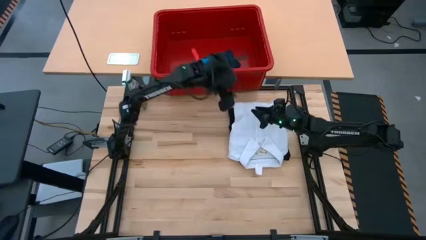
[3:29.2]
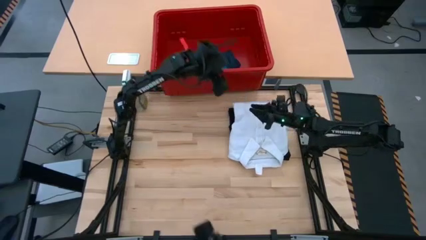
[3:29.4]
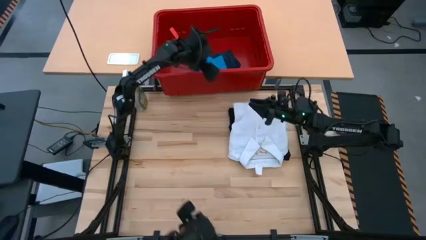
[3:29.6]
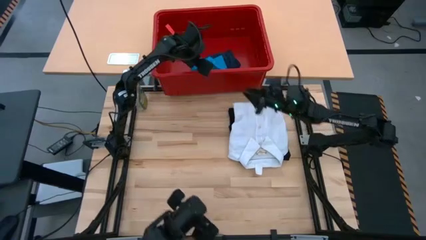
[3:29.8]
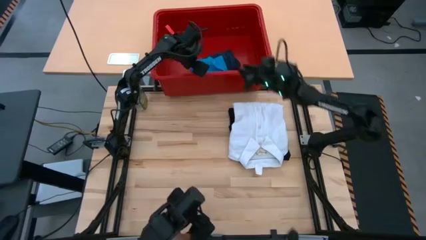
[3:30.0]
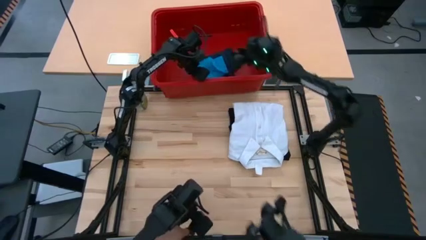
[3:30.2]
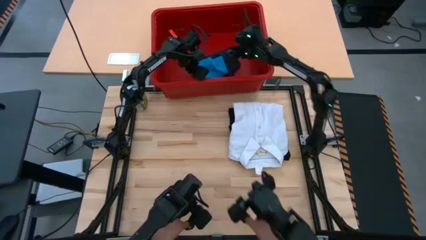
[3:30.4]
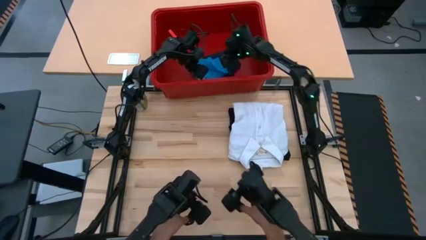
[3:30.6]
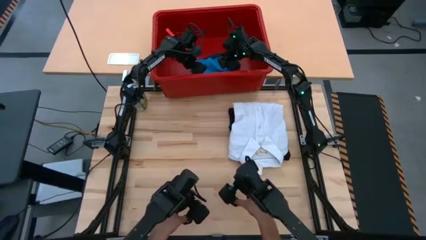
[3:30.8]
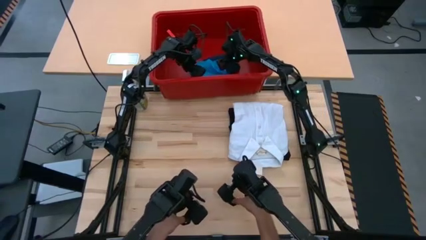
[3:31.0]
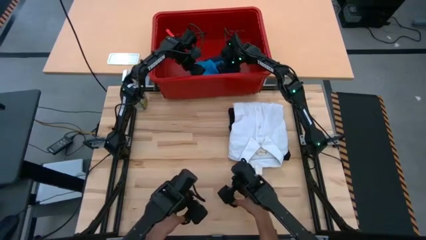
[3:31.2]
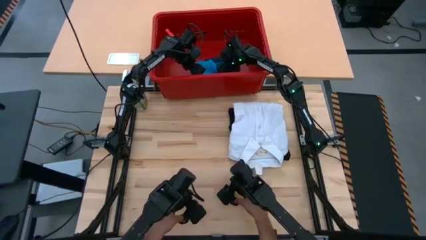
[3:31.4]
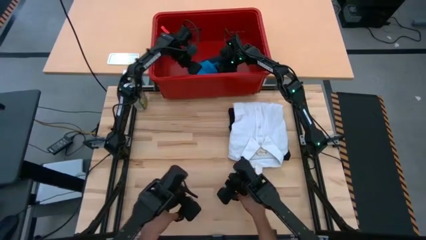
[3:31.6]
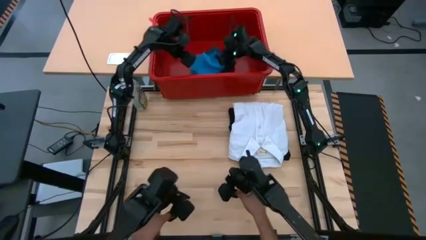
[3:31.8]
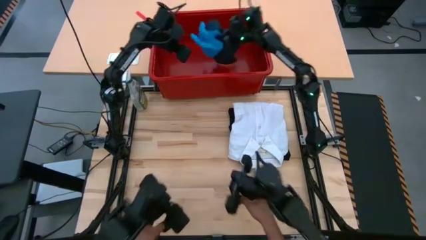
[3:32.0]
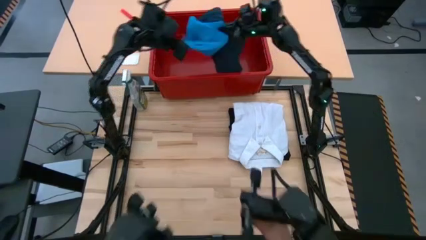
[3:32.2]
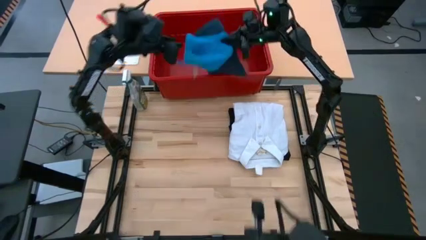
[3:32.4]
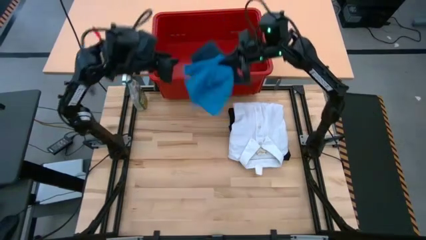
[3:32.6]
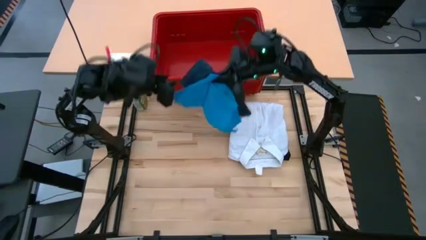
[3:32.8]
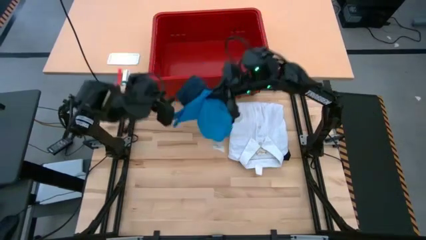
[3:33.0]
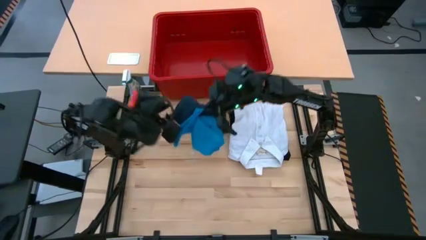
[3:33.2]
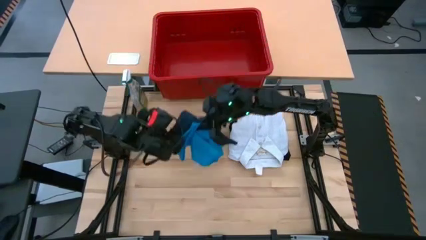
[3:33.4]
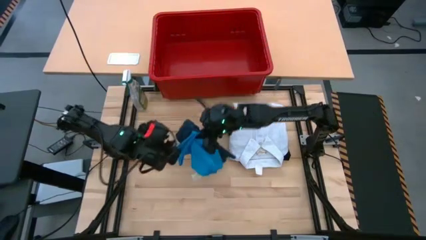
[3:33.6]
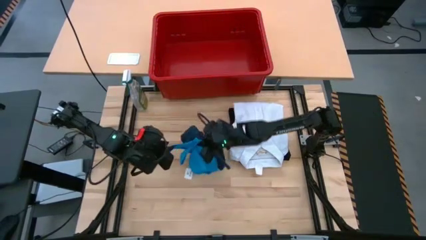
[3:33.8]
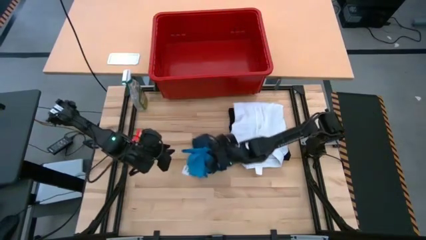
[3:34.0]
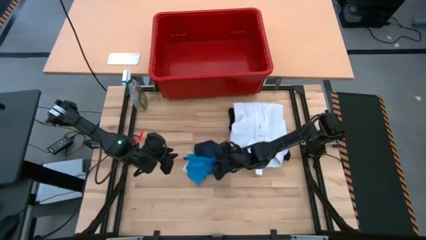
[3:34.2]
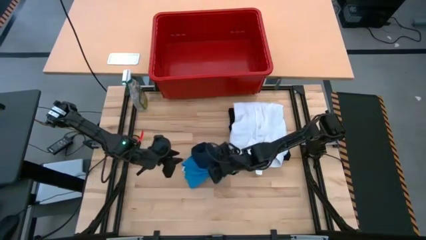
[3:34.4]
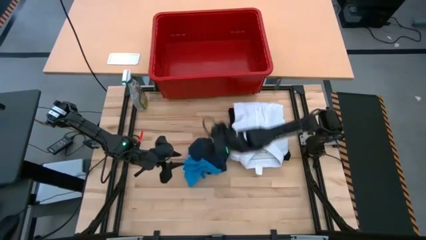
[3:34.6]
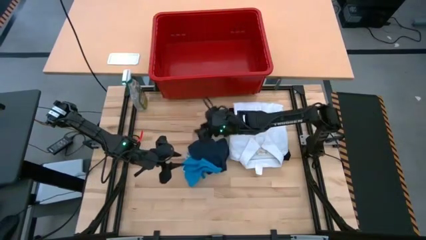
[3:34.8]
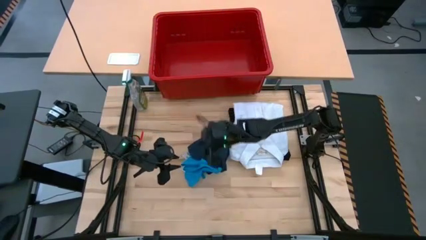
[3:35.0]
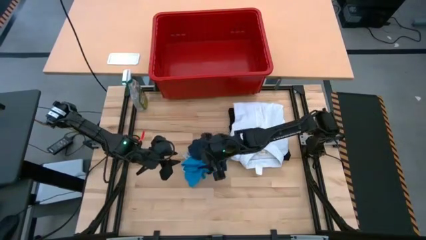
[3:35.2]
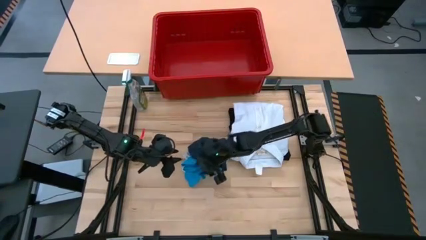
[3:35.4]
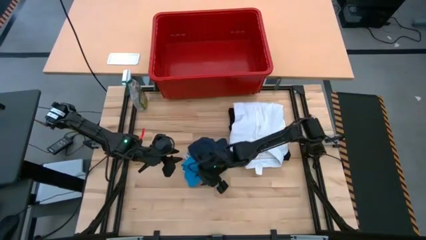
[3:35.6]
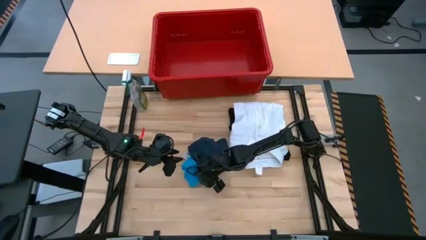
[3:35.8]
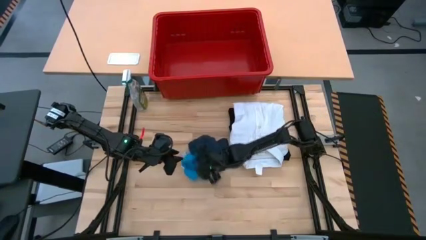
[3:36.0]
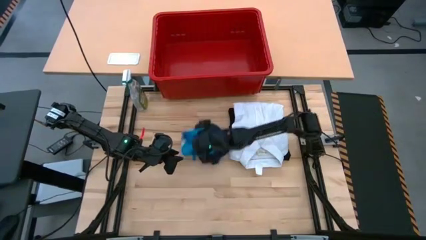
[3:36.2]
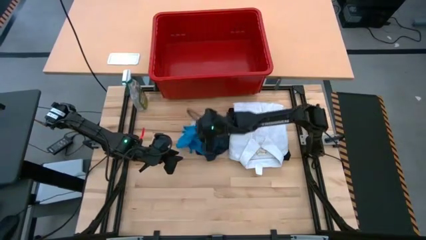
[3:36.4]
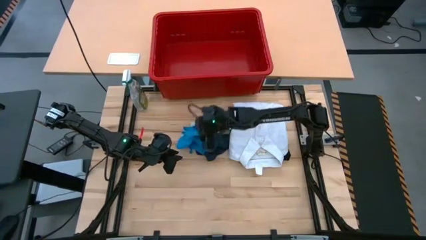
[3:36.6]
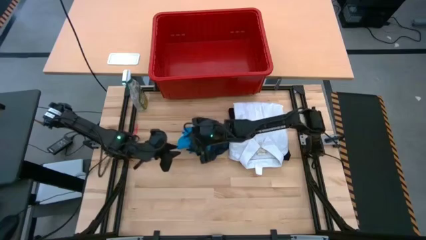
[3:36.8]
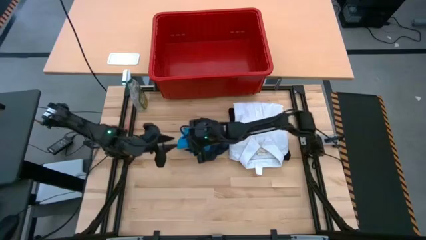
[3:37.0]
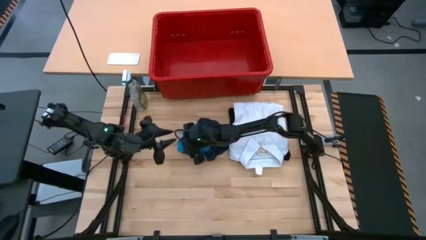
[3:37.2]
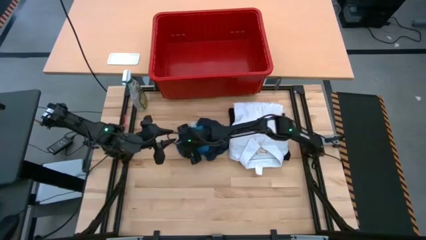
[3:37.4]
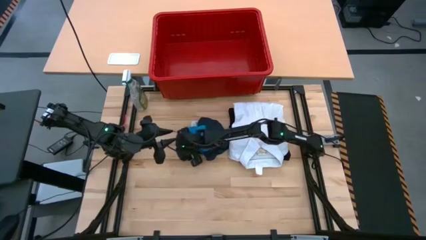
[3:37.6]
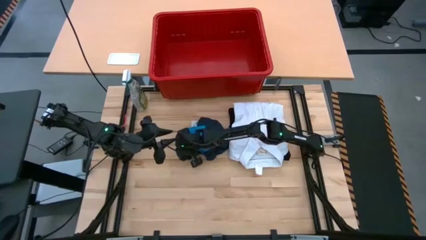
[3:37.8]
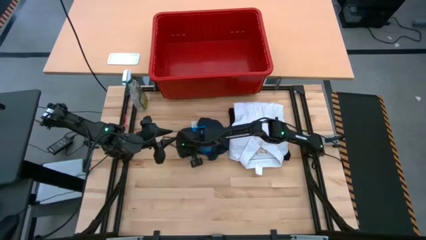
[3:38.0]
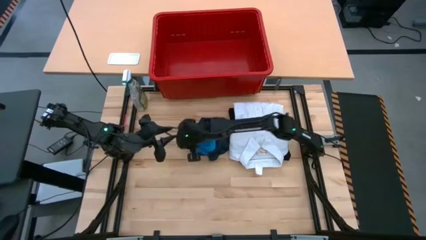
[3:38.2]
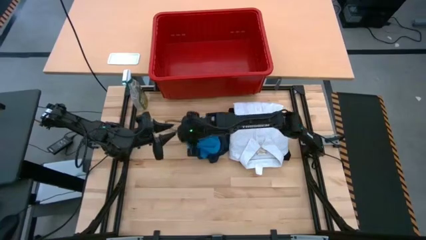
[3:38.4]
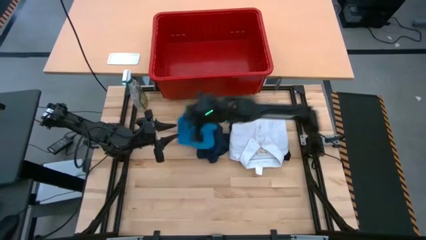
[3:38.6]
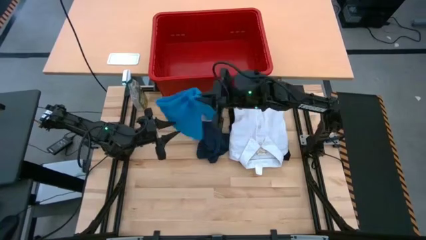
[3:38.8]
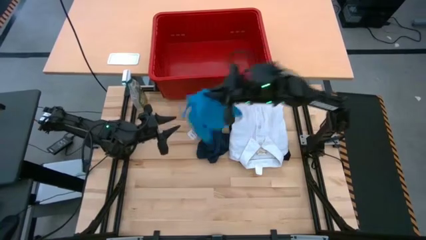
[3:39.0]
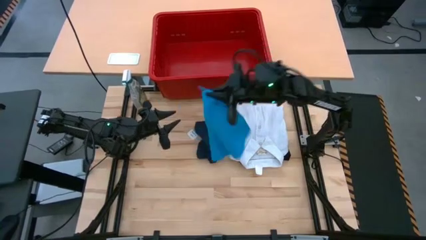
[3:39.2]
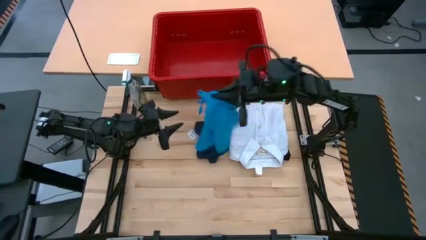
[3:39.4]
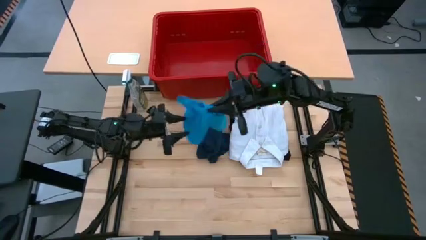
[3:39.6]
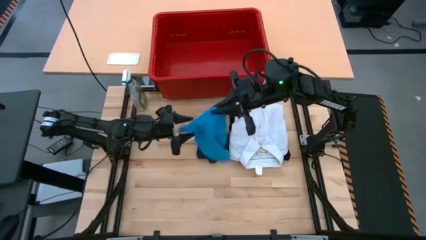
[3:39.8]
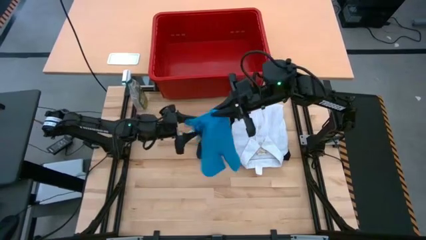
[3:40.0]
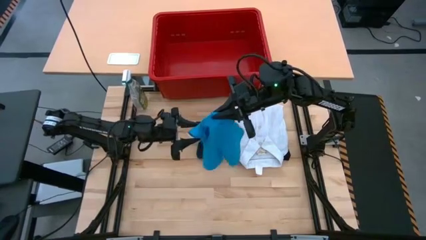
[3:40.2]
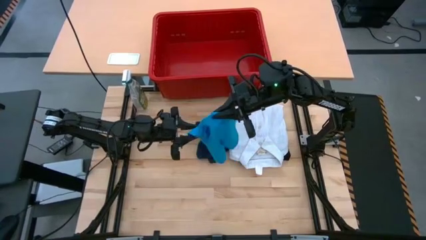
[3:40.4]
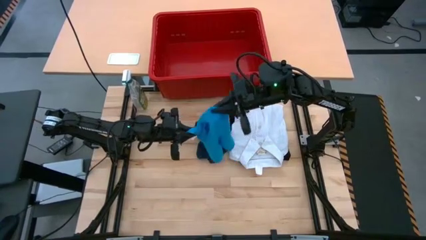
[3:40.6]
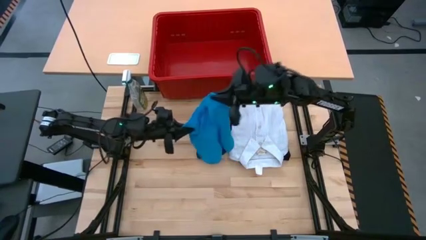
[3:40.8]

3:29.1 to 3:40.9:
Task: Fold laundry
Fold the blue shorts on the table

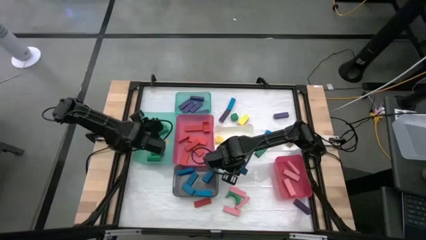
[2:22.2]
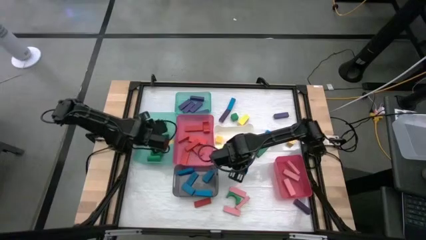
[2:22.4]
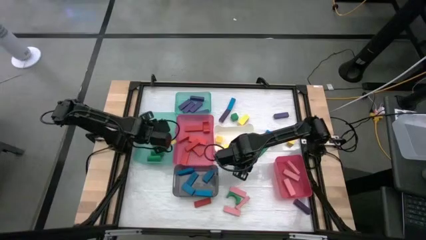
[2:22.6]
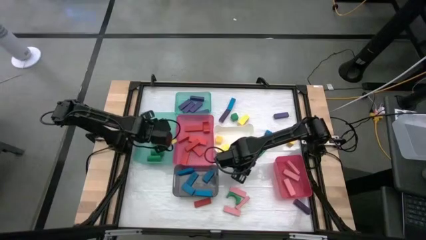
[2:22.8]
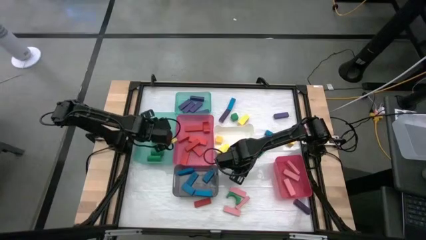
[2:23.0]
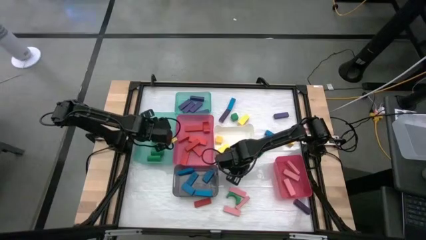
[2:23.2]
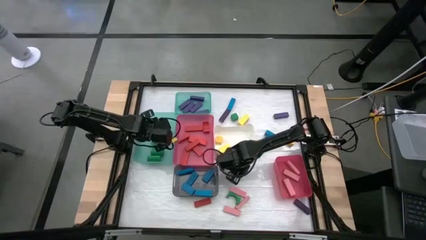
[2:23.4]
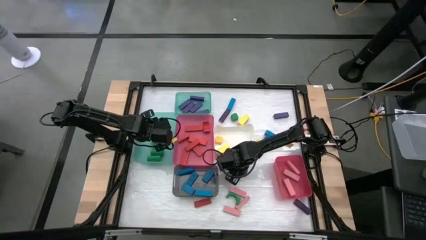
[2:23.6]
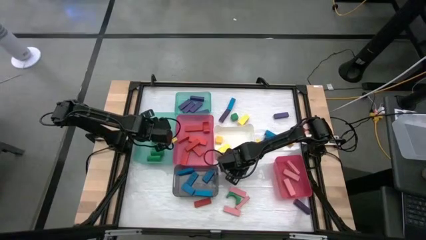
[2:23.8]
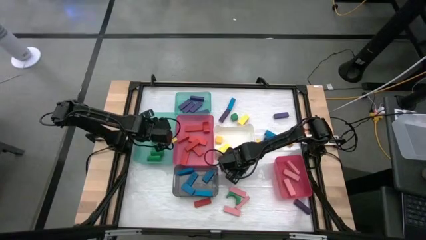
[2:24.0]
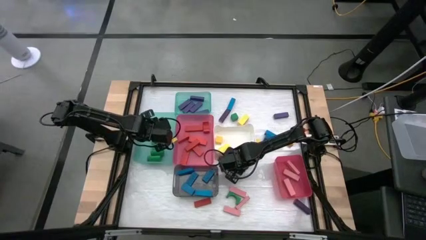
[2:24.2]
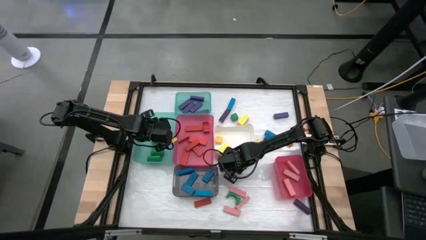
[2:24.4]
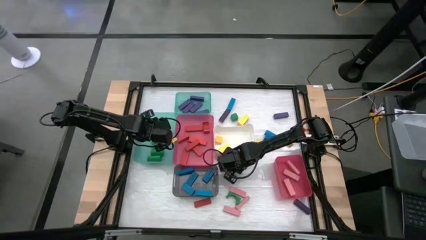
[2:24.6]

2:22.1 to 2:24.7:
Task: Sort blocks
Put the blue block into the black bin
